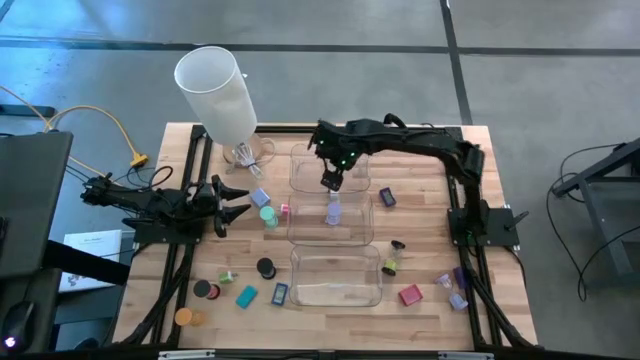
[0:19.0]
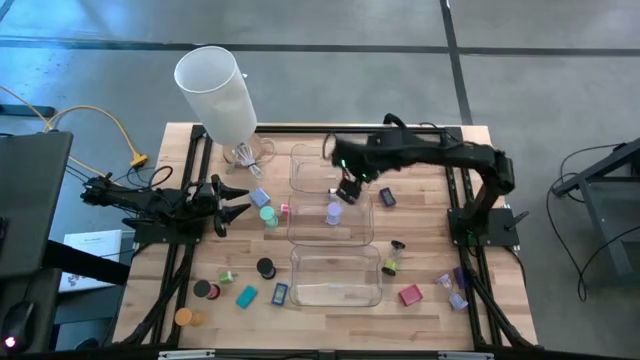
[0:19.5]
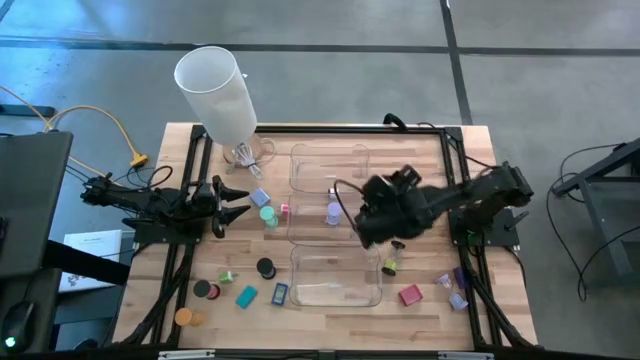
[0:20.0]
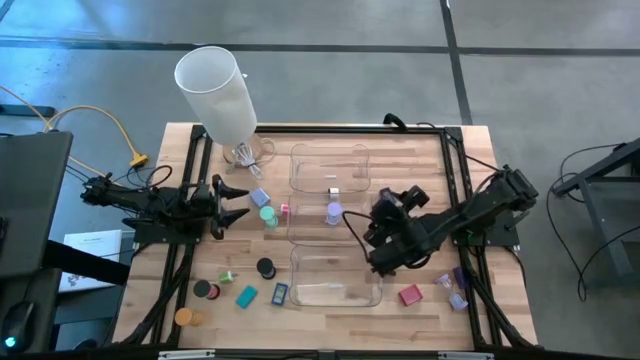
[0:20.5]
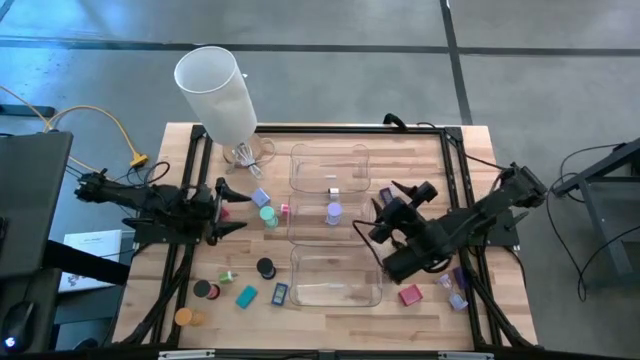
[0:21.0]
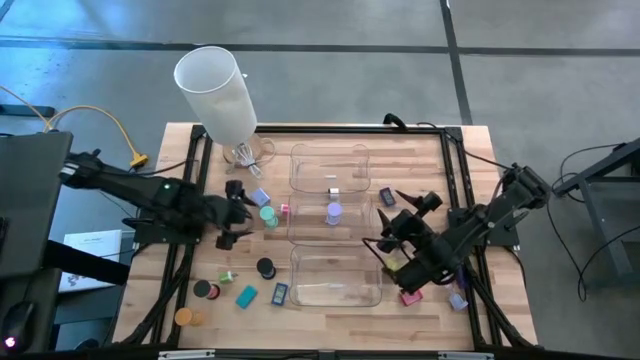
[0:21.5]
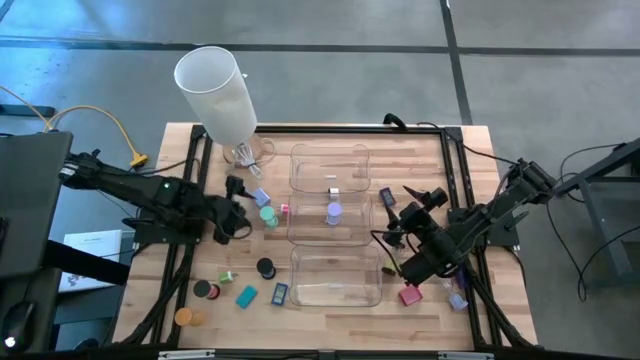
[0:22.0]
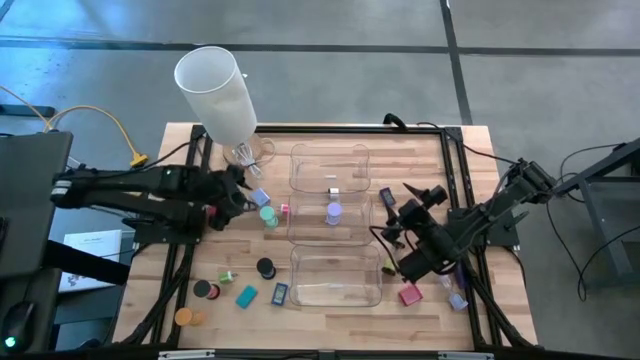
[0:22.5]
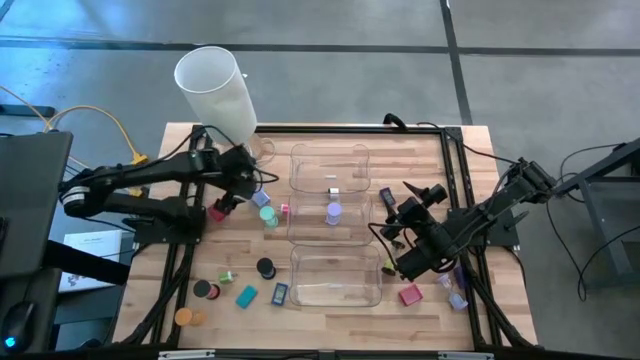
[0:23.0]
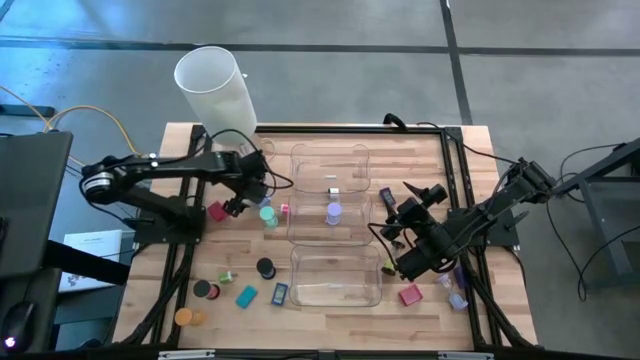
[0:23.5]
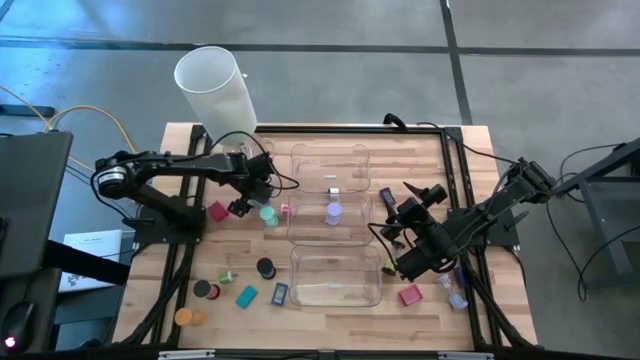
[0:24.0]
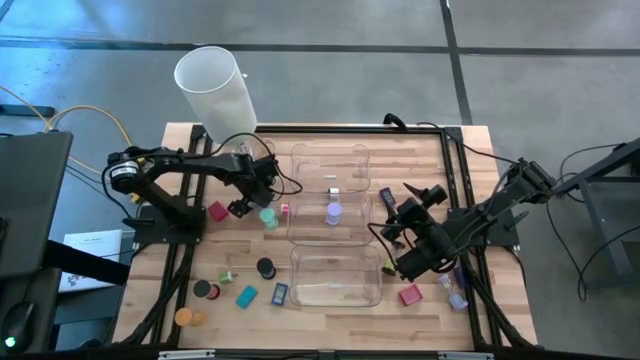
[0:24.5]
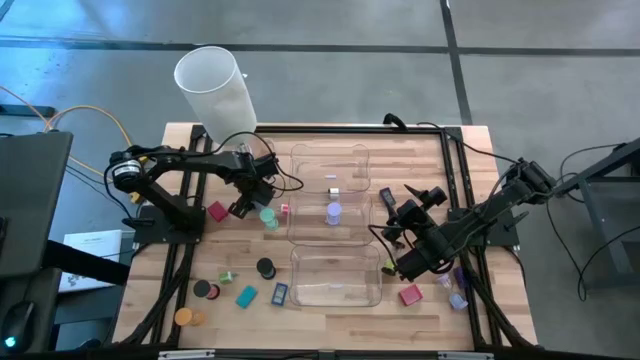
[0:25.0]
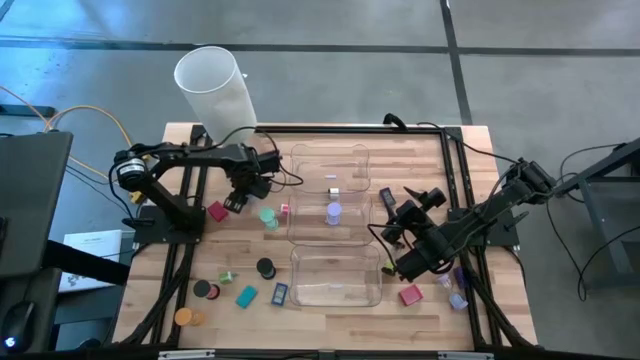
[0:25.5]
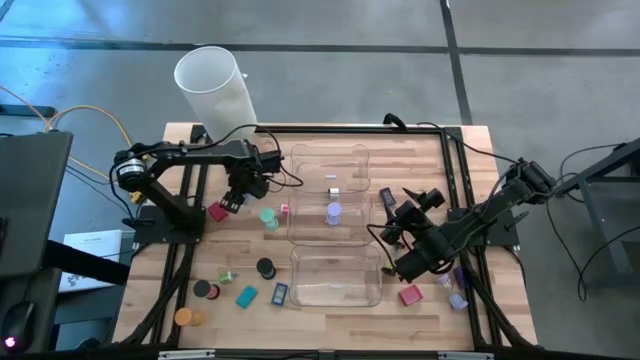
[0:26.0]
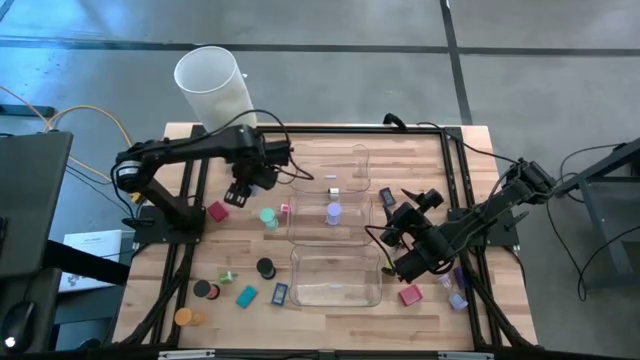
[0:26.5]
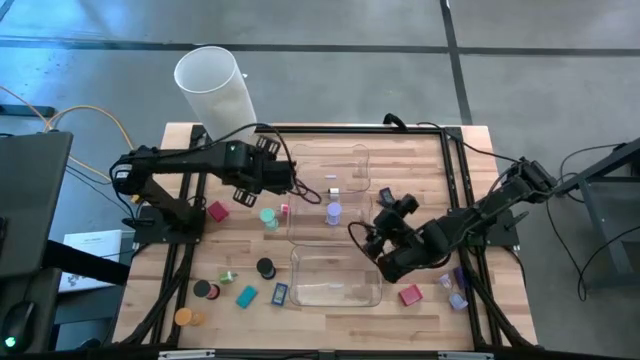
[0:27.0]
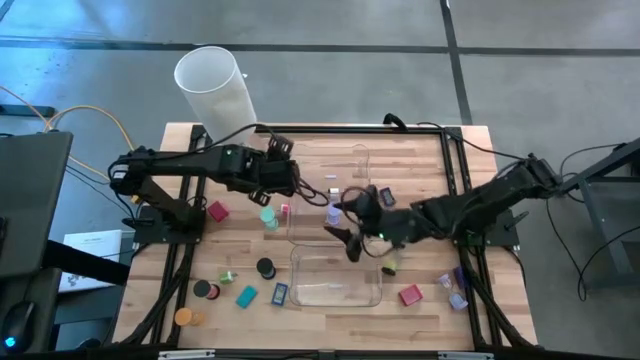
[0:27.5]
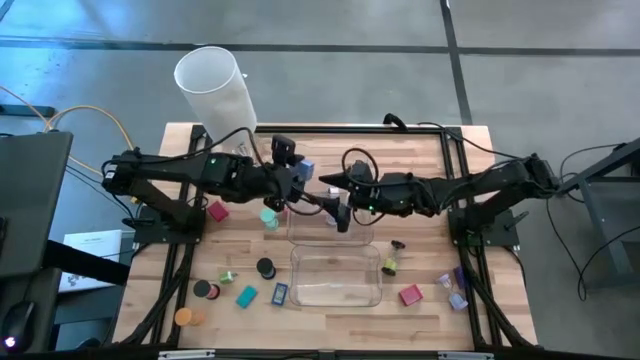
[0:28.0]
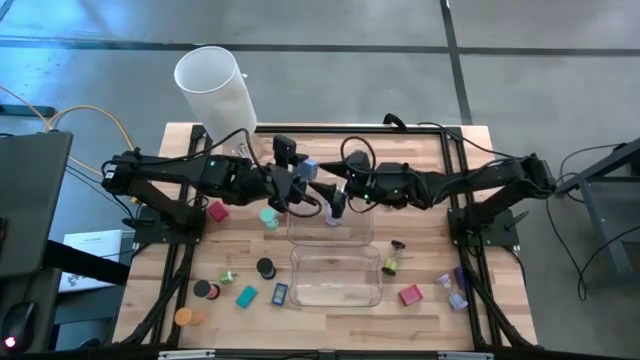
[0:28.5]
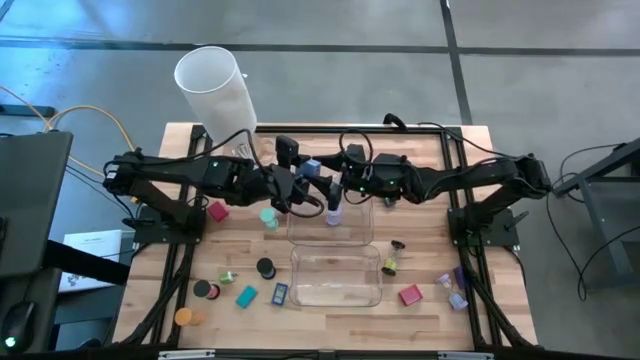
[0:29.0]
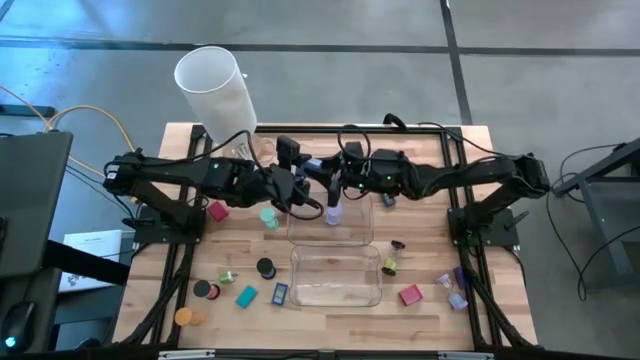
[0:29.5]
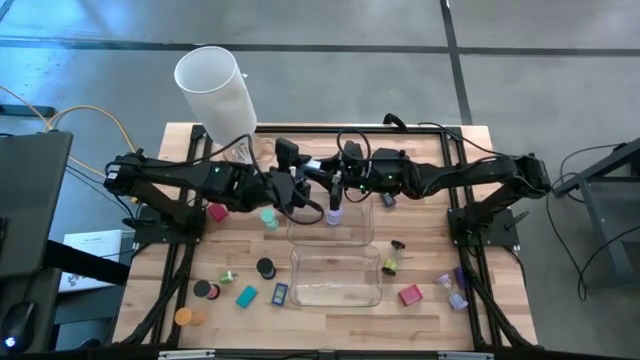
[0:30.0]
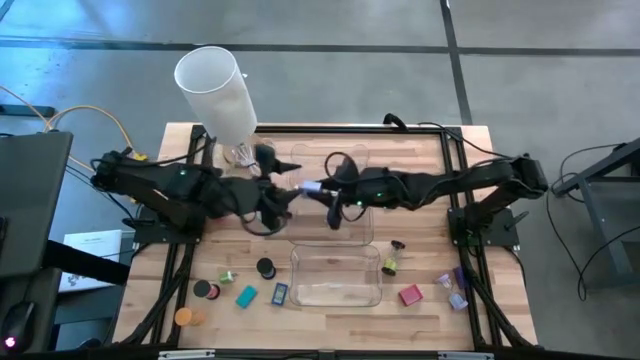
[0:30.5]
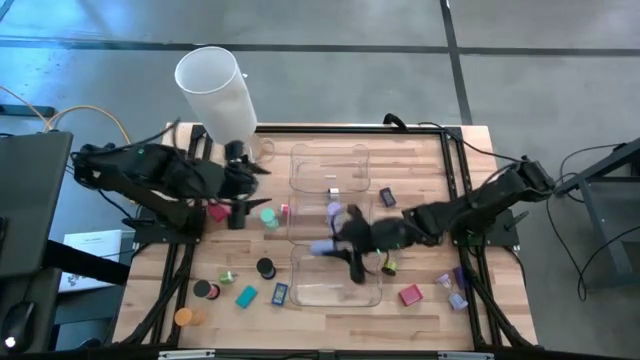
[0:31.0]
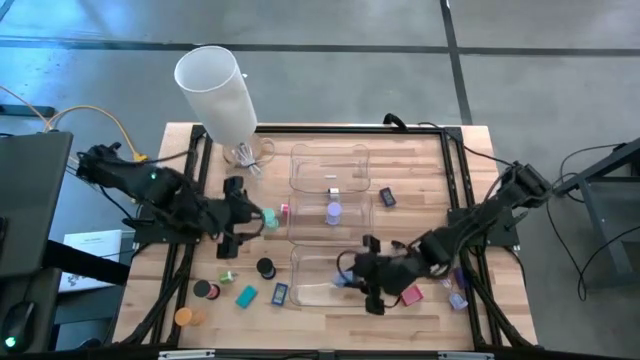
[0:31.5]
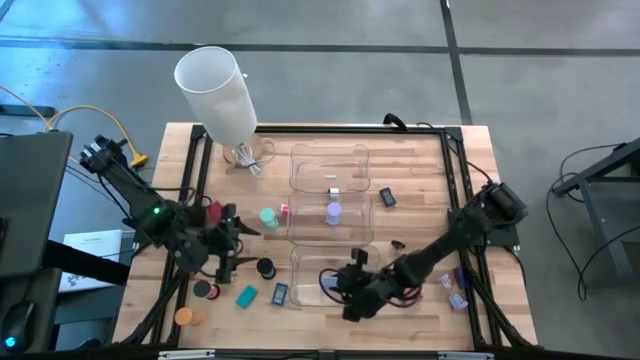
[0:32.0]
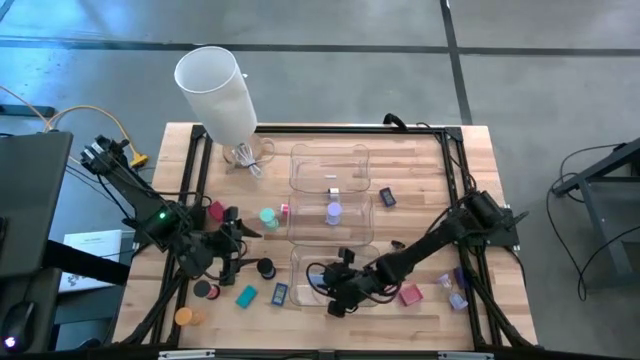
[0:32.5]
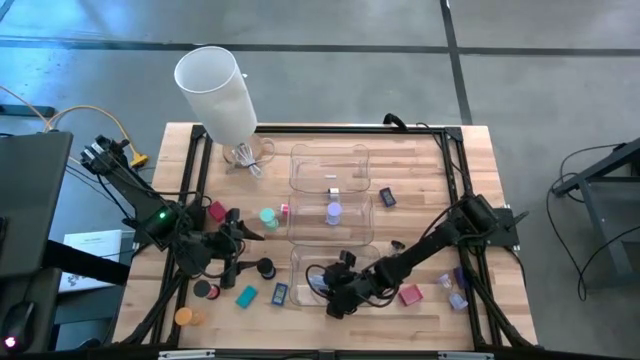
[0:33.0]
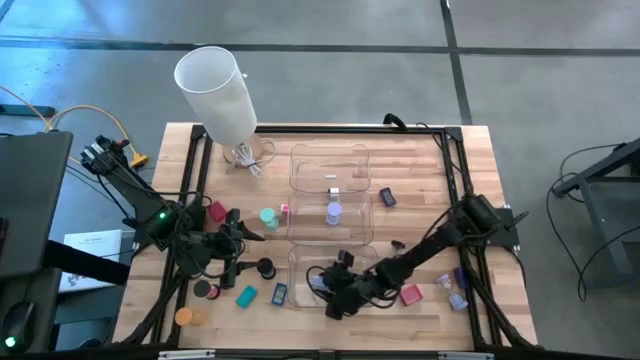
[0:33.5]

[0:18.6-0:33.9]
Task: Pick & Place Office items
Put the purple charger adapter into the left transparent bin

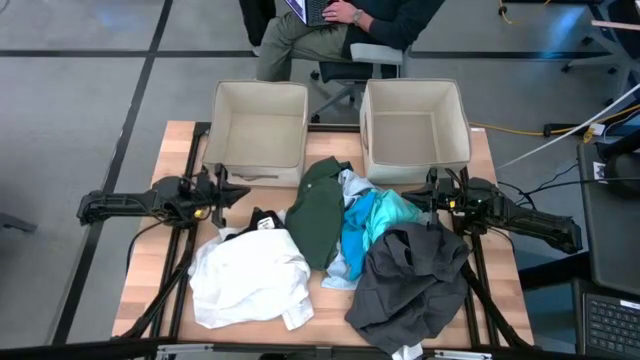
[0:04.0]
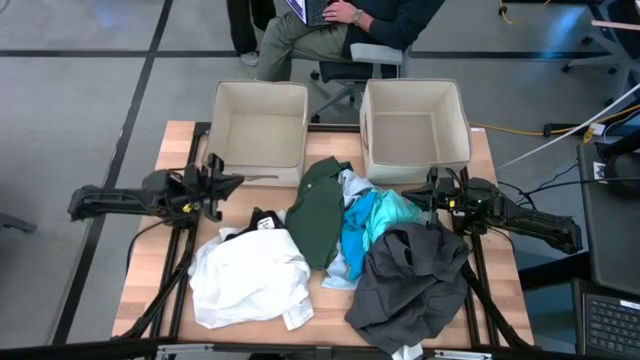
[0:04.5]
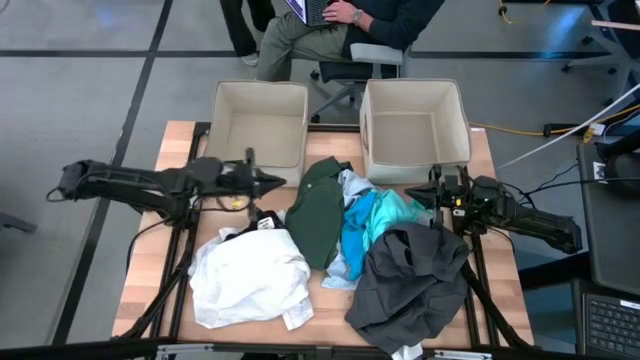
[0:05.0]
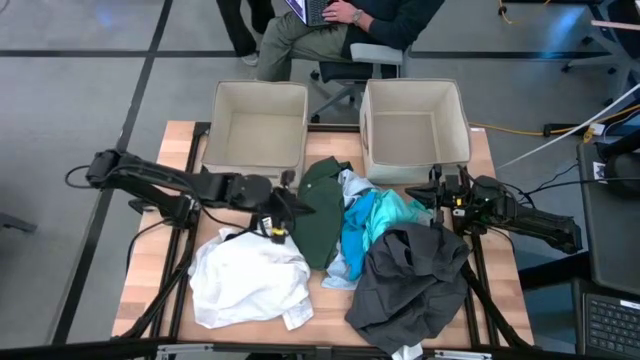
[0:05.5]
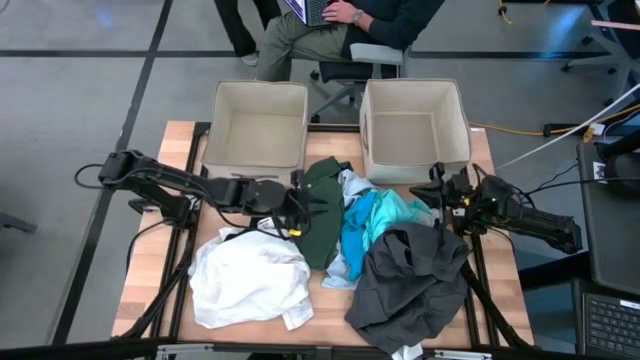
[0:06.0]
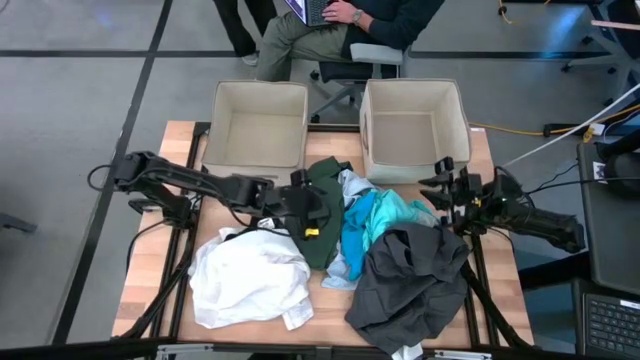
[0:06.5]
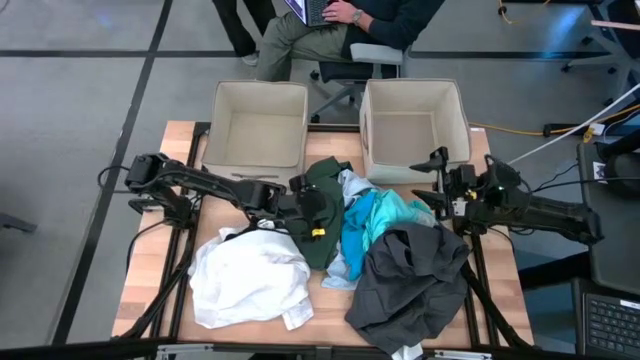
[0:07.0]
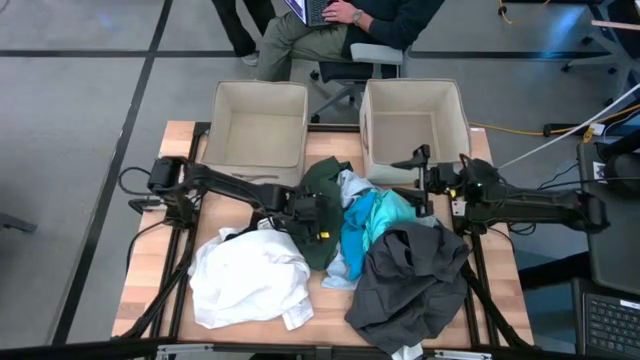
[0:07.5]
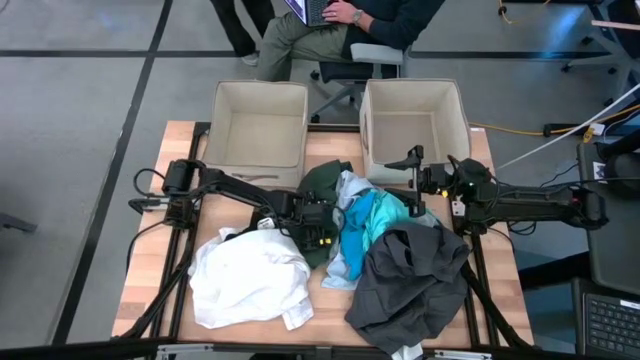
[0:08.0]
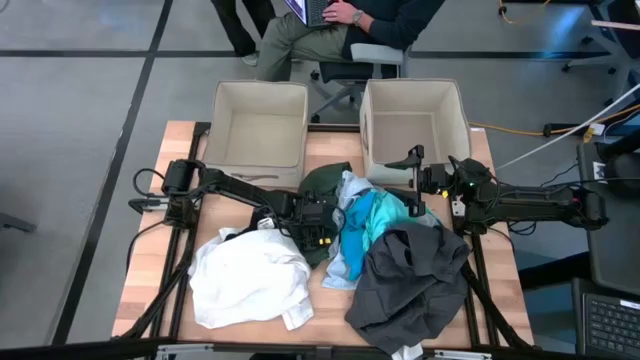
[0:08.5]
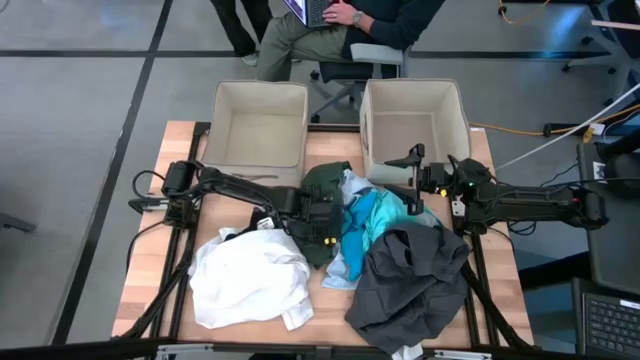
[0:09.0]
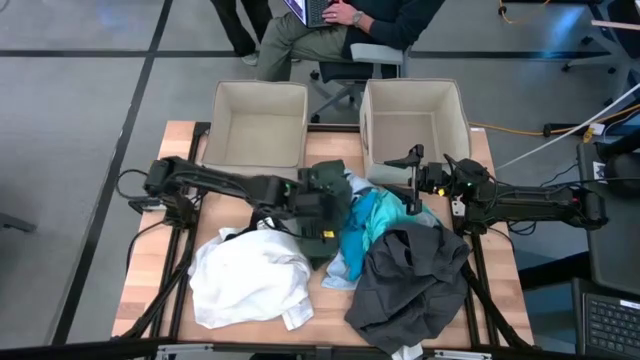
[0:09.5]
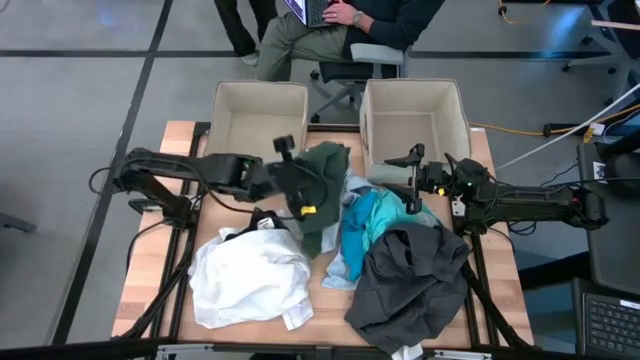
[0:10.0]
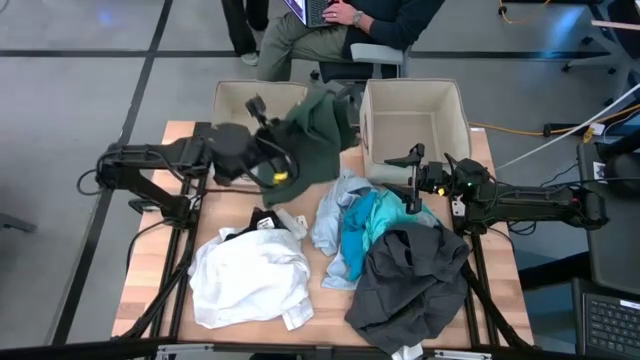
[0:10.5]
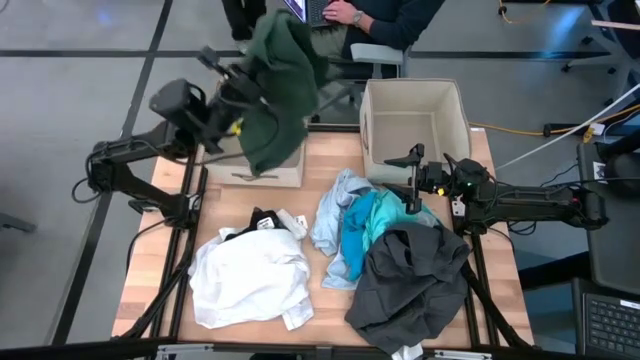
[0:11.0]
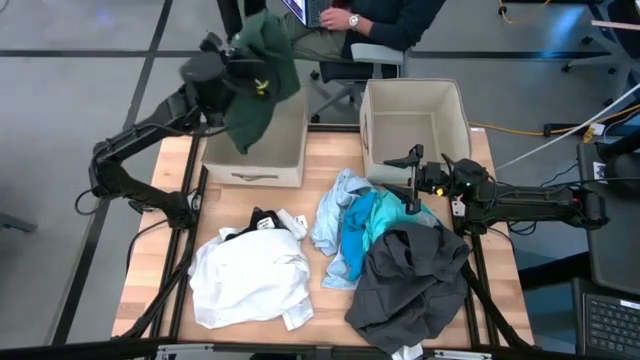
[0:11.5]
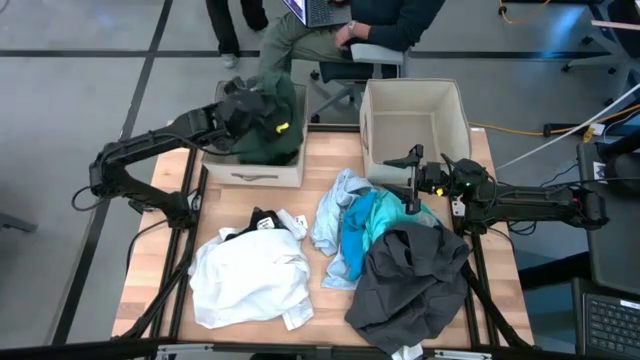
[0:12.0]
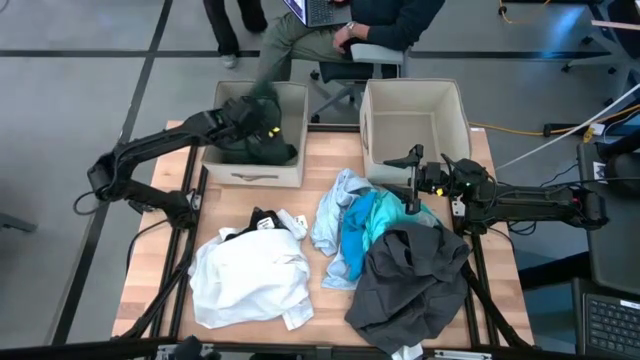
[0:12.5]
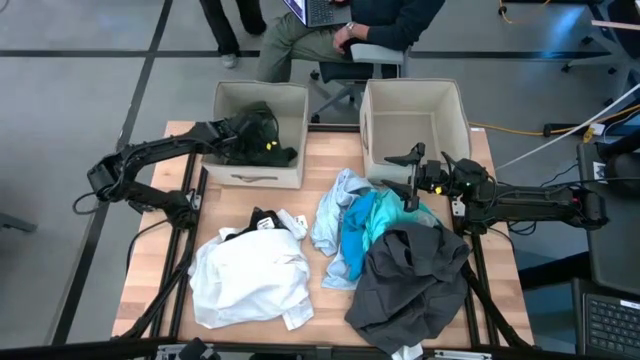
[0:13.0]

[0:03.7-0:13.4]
Task: Sort clothes
Put the green shirt into the left laundry organizer
